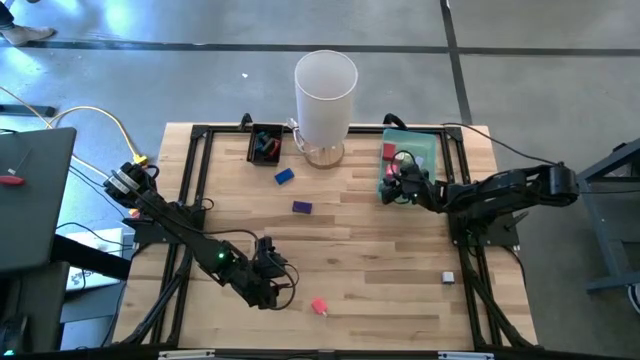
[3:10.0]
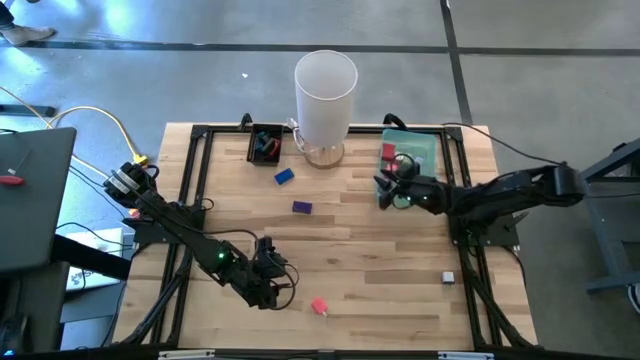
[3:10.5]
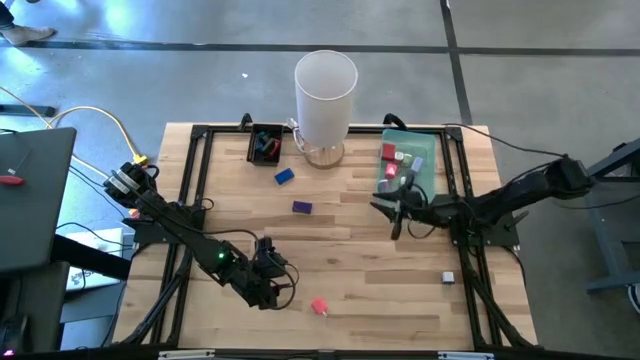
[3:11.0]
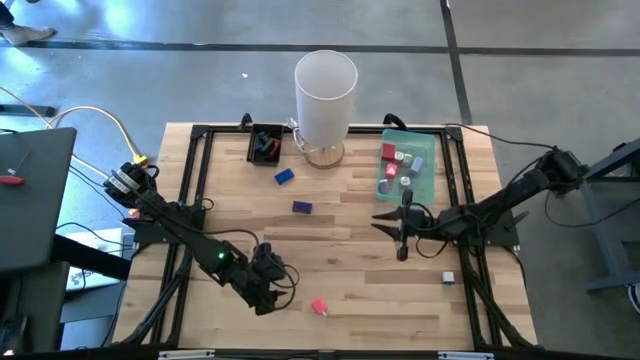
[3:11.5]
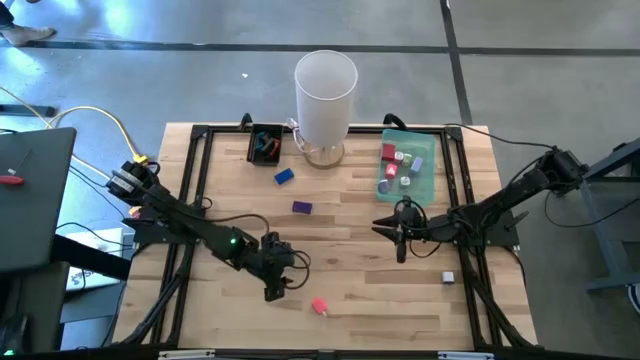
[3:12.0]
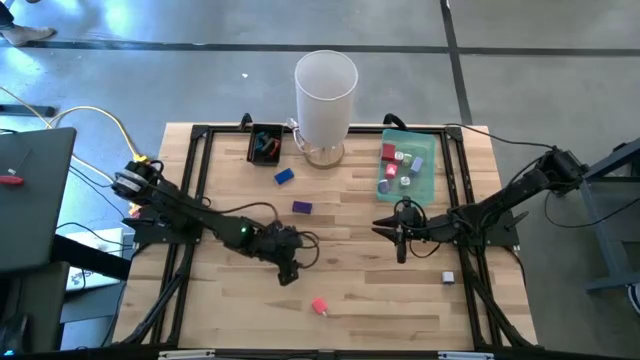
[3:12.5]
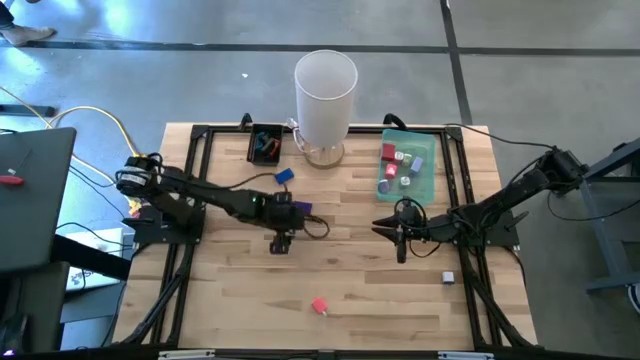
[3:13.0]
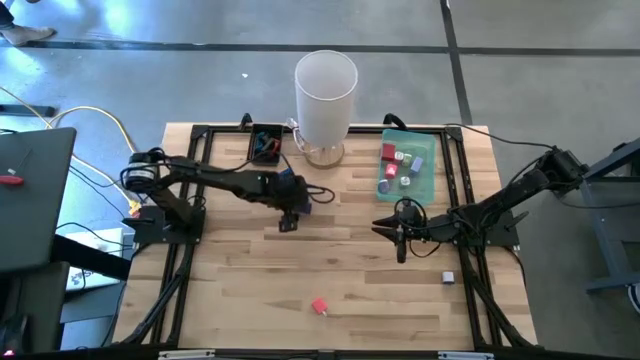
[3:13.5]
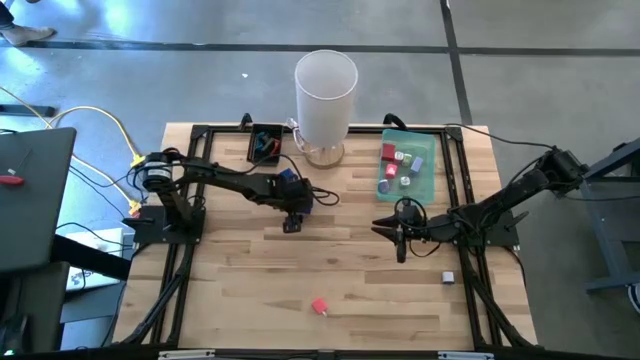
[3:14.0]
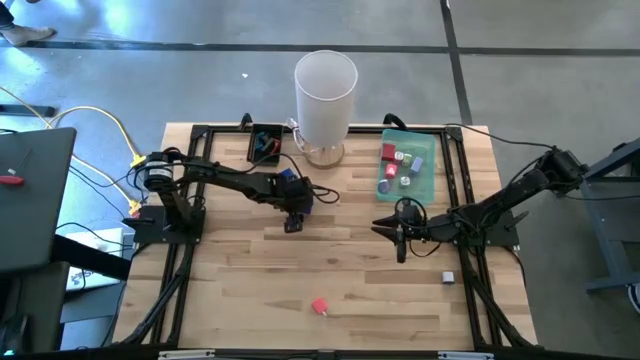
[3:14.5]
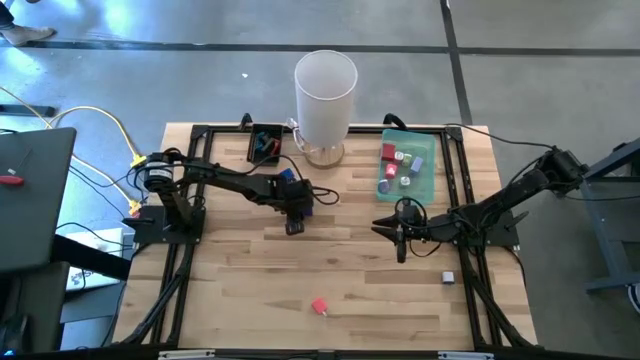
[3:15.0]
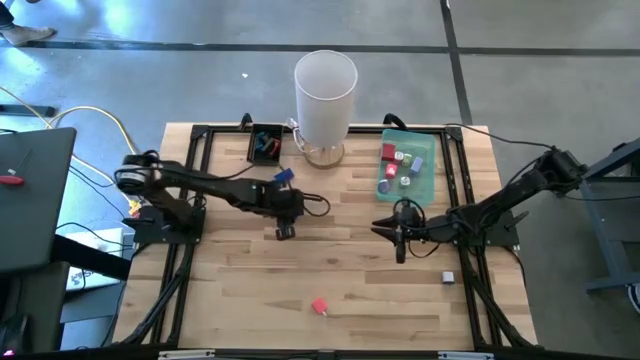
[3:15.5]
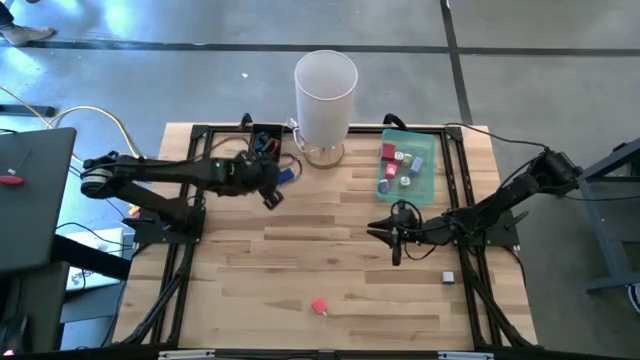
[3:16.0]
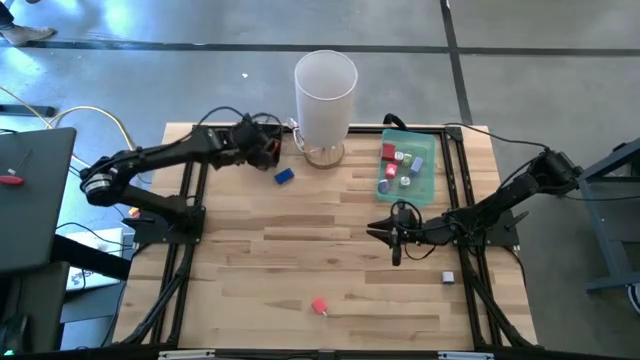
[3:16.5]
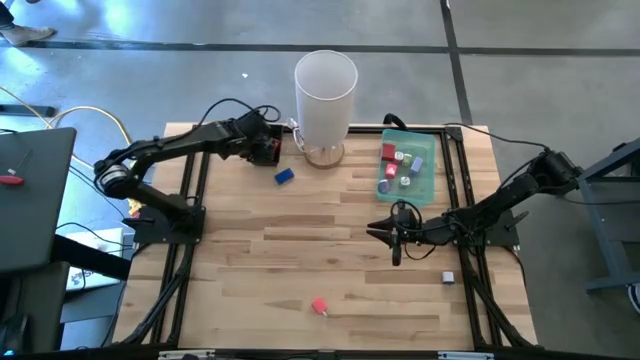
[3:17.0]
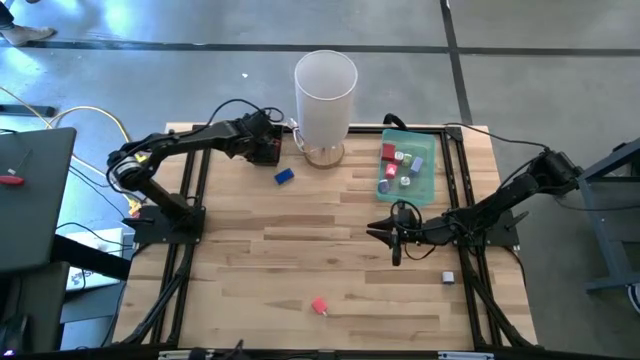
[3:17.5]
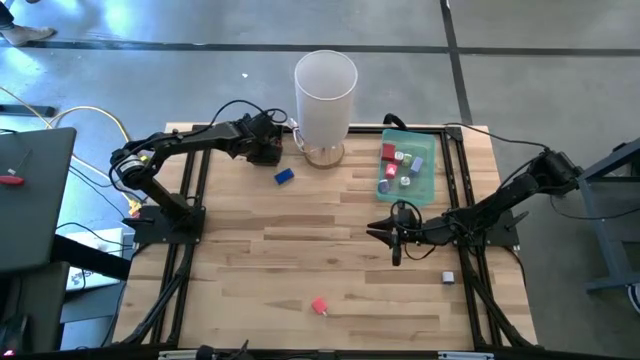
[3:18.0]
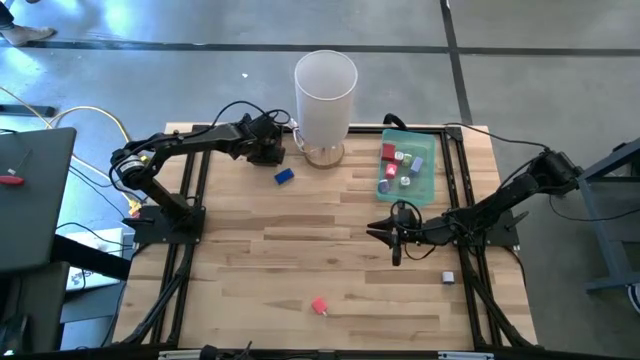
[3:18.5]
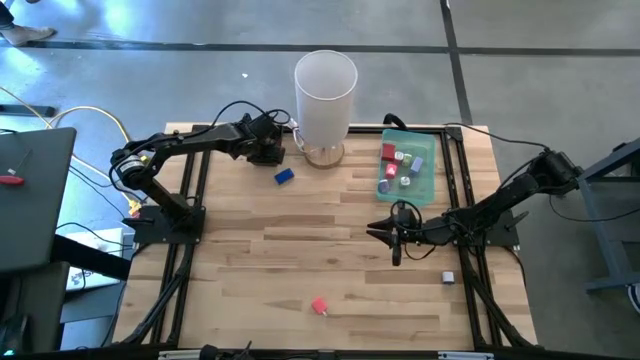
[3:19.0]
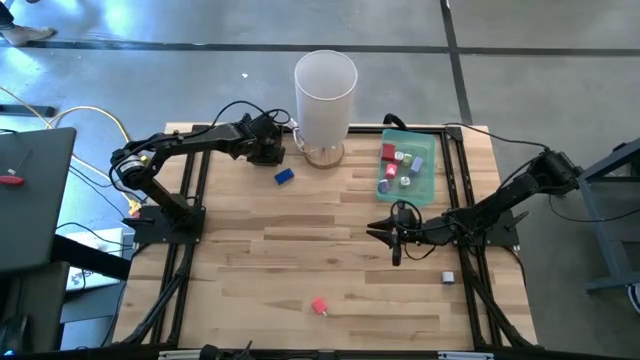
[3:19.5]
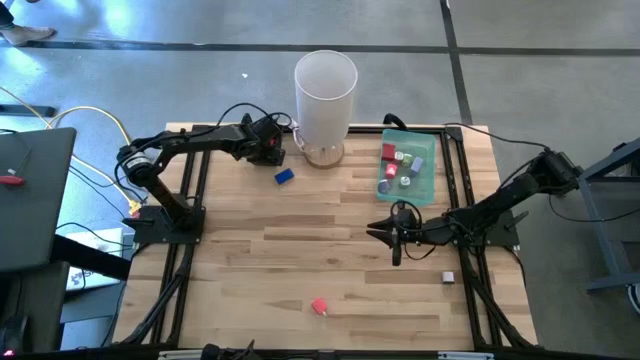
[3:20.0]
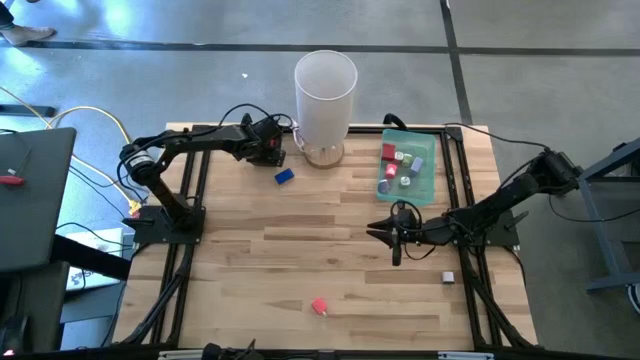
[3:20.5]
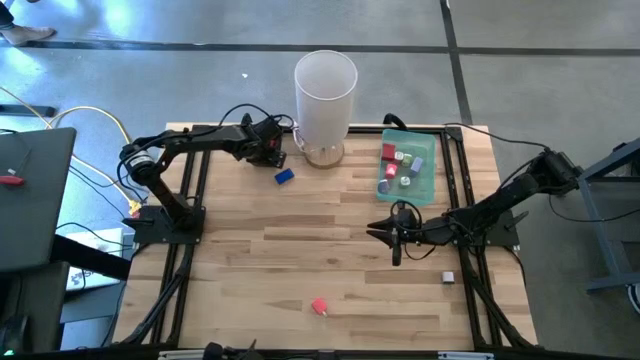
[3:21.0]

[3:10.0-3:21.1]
Task: Pick & Place Office items
Put the purple digital clock into the black bin

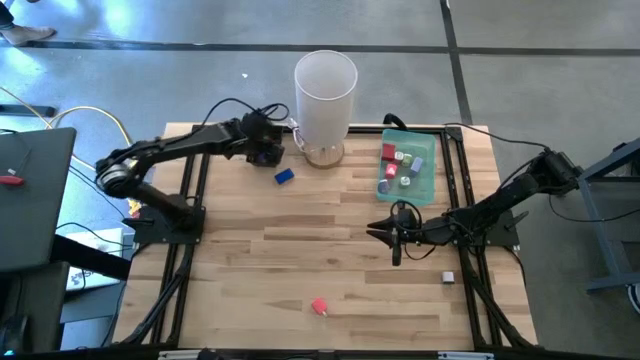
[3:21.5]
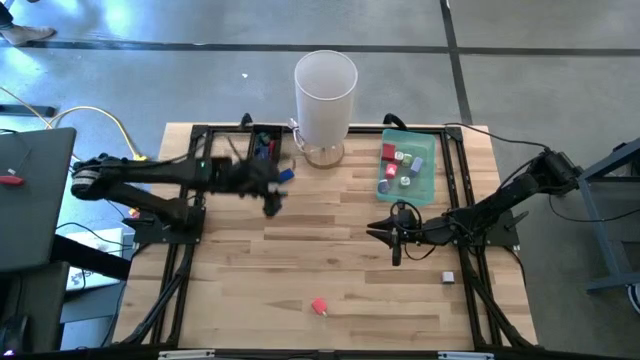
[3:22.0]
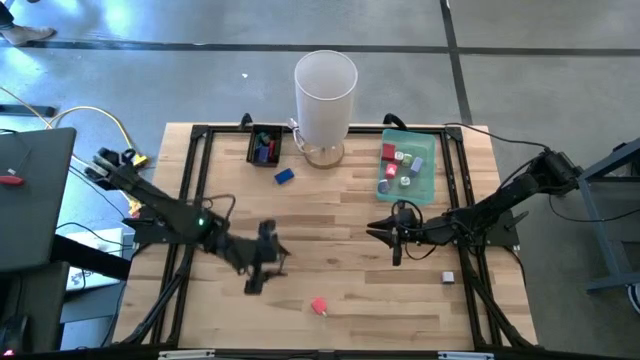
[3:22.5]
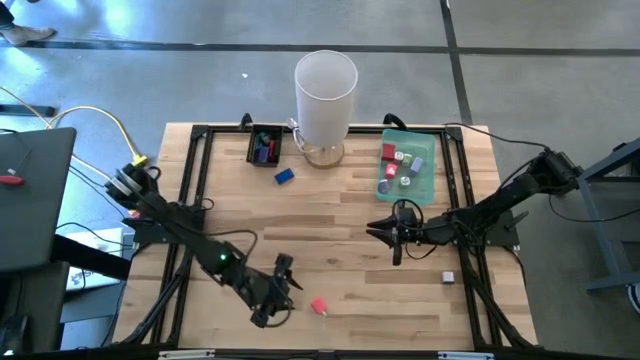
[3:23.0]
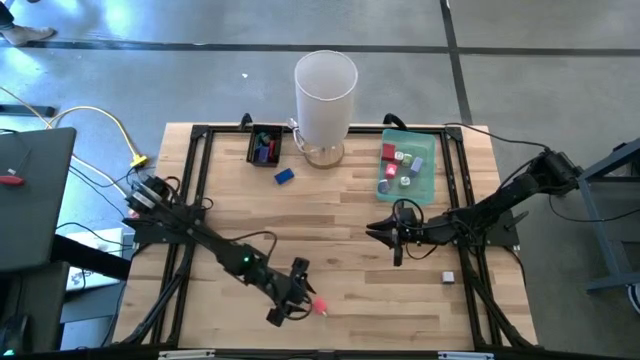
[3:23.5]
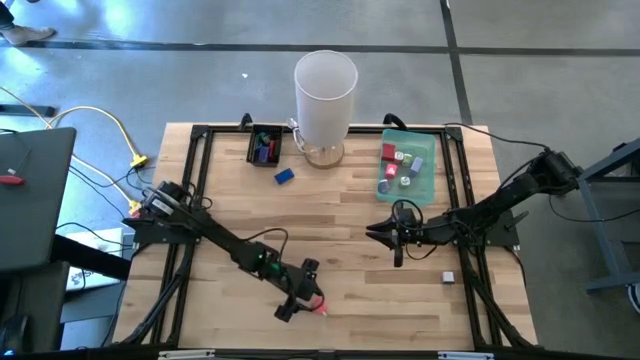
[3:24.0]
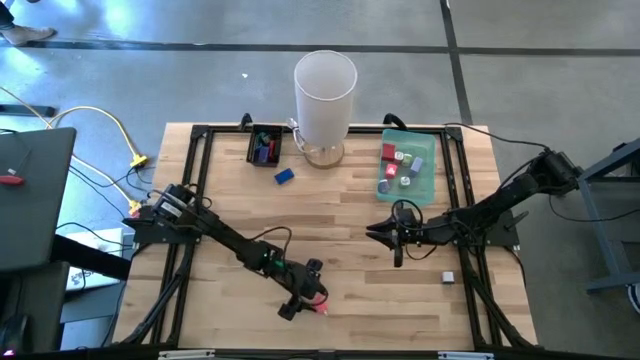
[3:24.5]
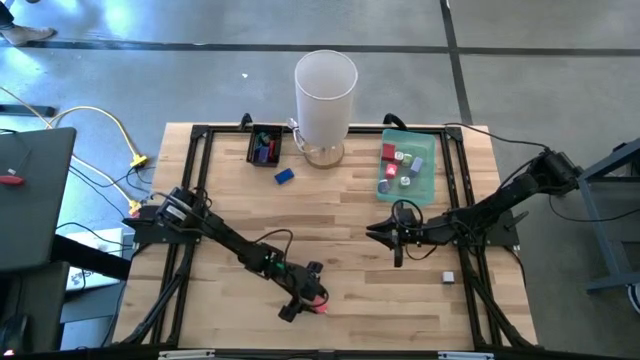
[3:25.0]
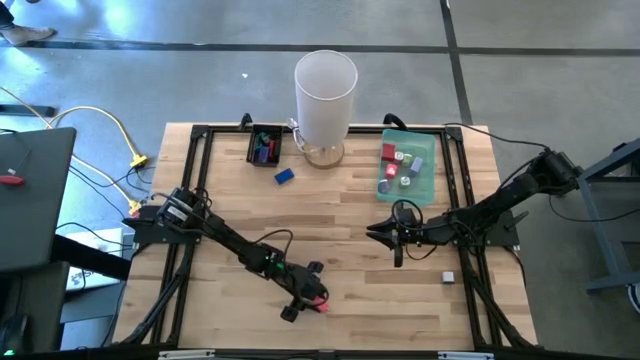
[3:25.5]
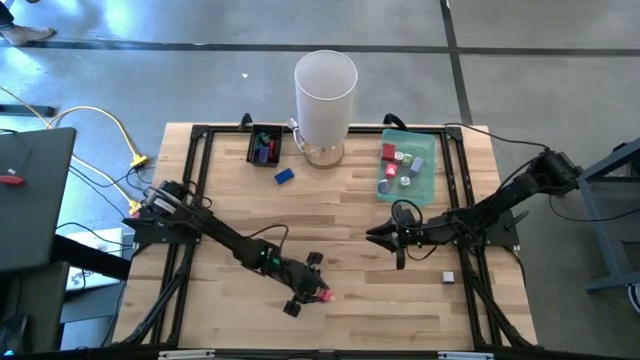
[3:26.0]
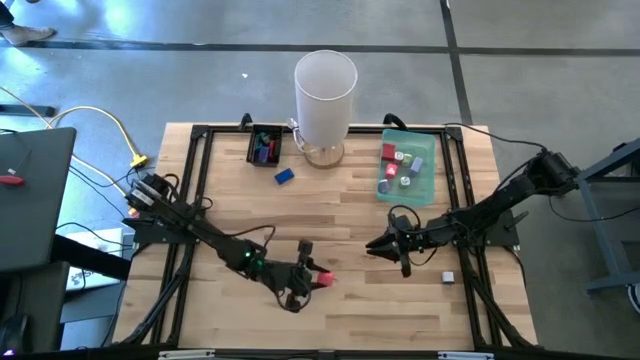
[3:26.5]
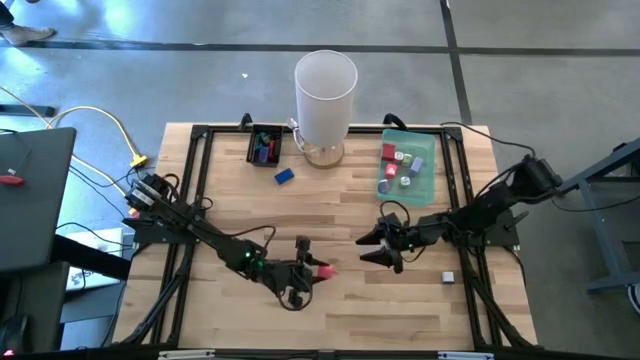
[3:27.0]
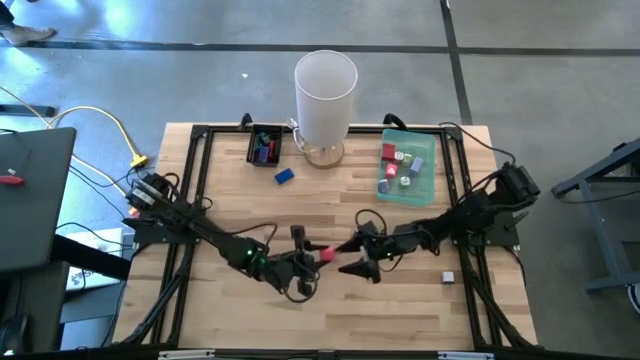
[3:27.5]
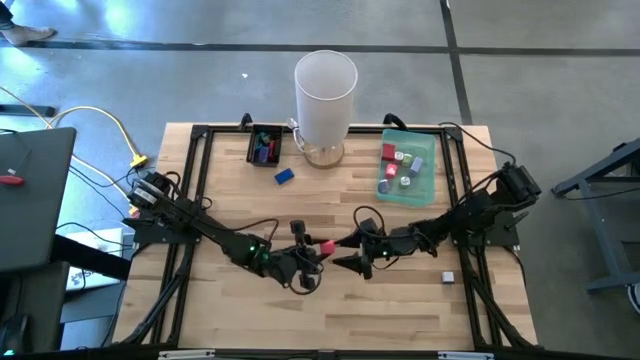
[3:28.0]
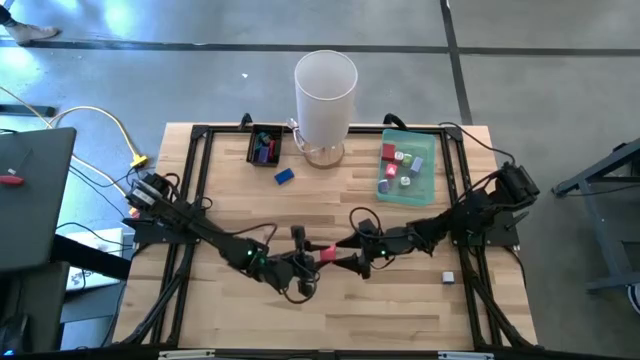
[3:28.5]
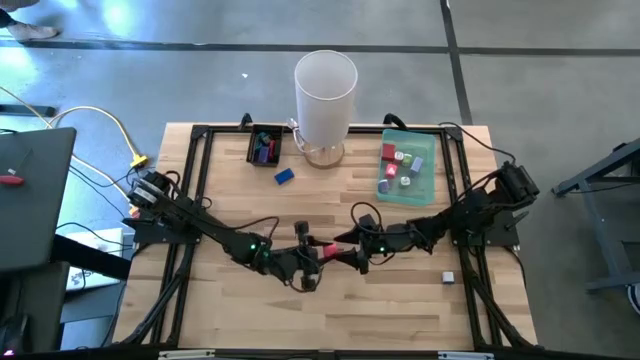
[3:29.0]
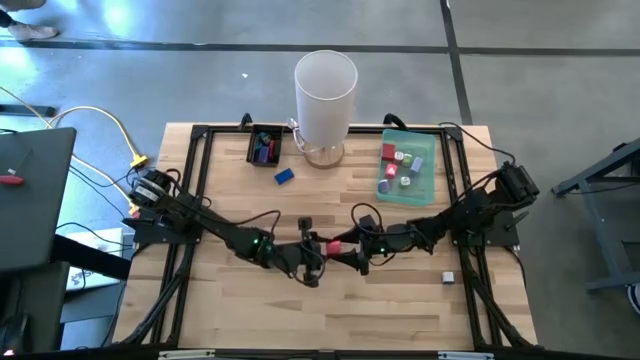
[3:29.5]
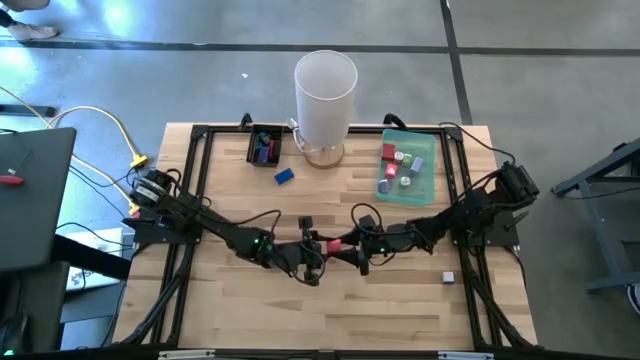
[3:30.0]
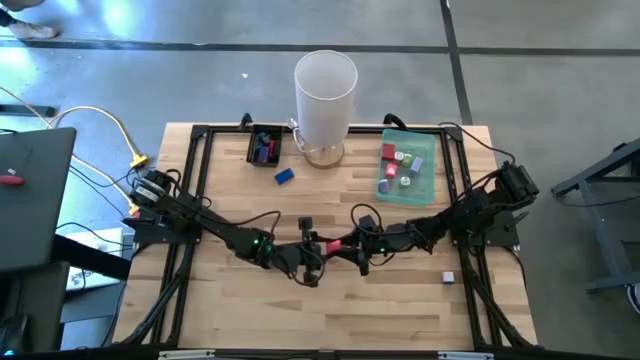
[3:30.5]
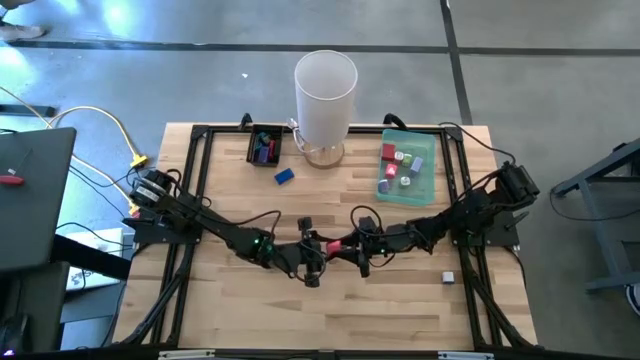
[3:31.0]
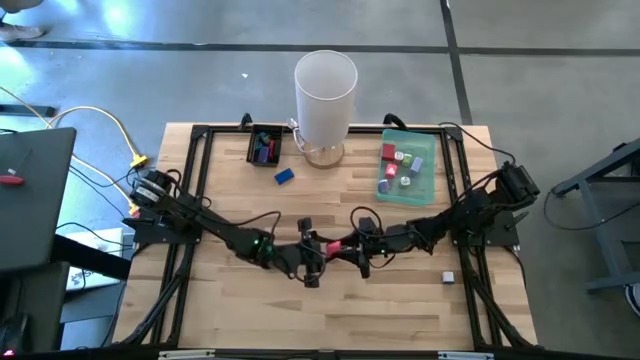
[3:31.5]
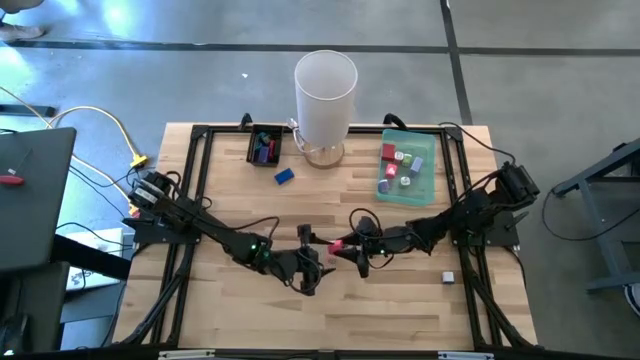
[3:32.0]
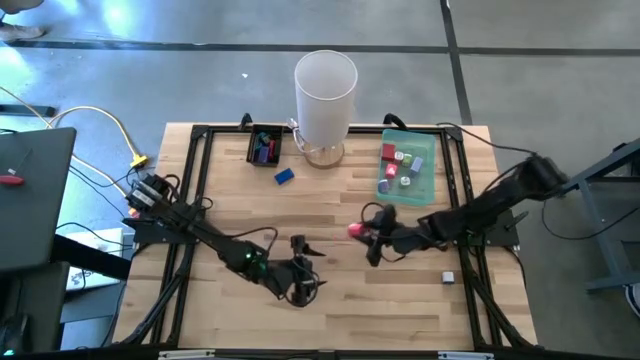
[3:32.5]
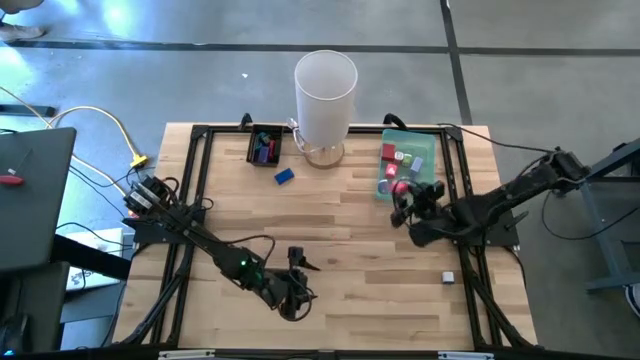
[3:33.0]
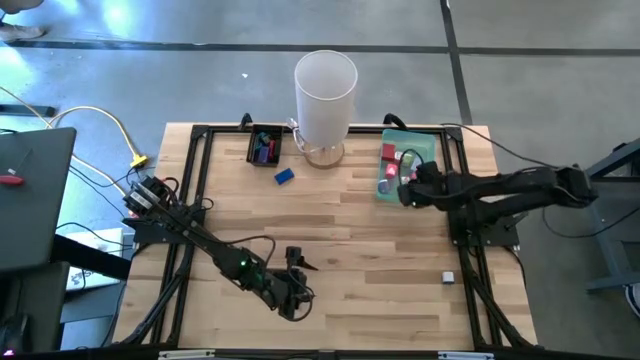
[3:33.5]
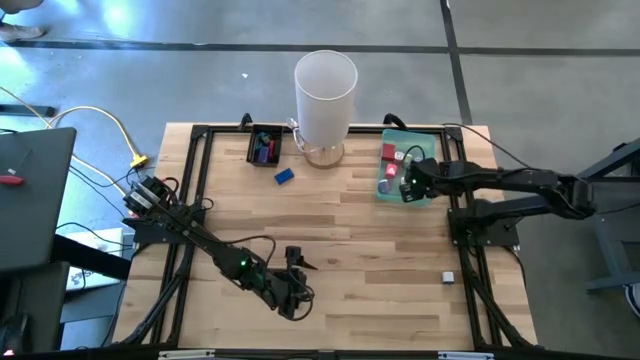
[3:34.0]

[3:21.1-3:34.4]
Put the pink adapter into the green bin
